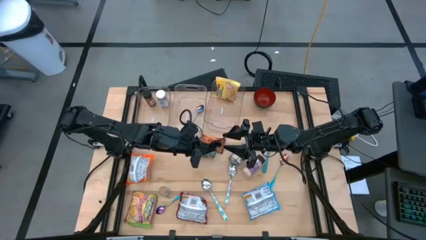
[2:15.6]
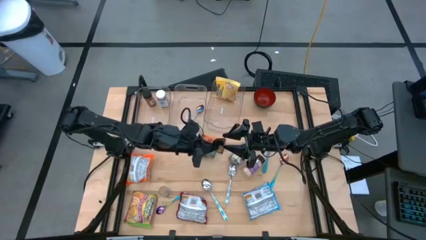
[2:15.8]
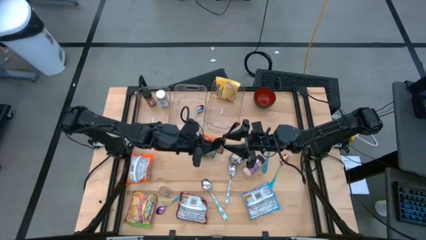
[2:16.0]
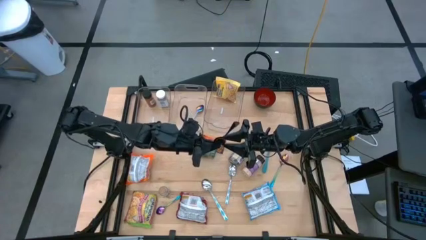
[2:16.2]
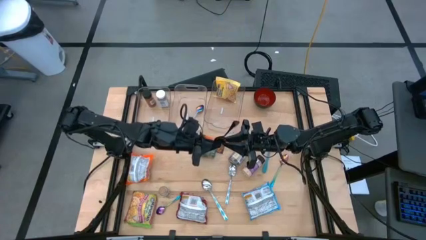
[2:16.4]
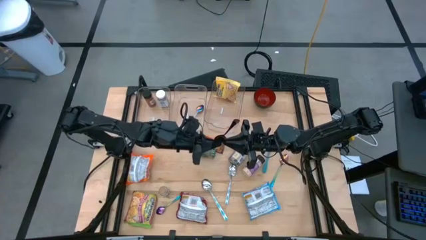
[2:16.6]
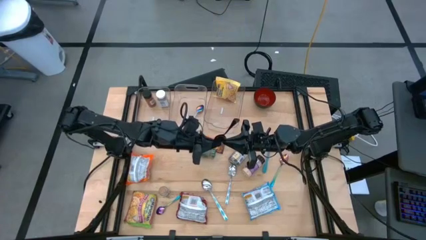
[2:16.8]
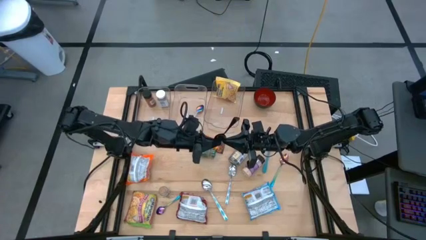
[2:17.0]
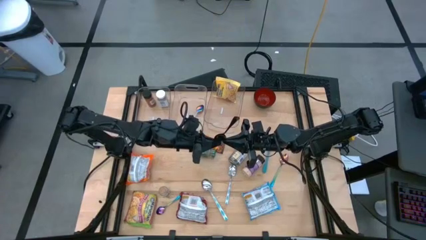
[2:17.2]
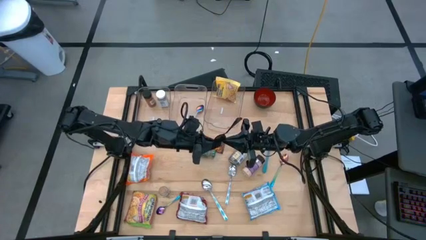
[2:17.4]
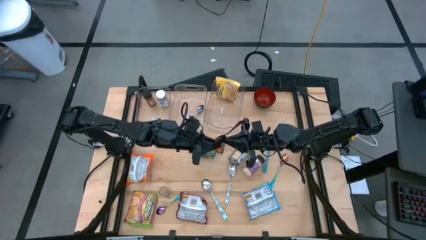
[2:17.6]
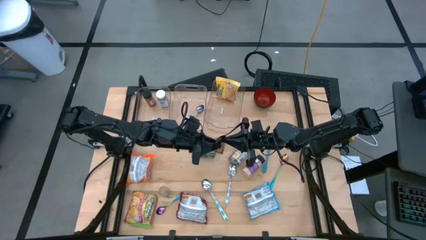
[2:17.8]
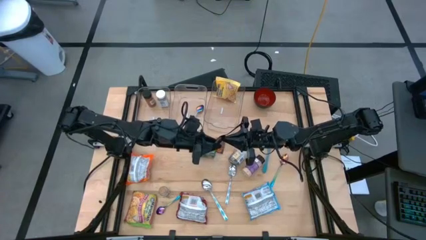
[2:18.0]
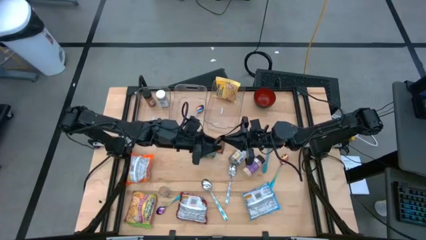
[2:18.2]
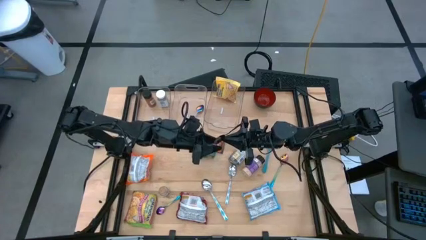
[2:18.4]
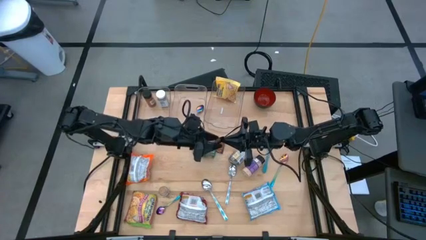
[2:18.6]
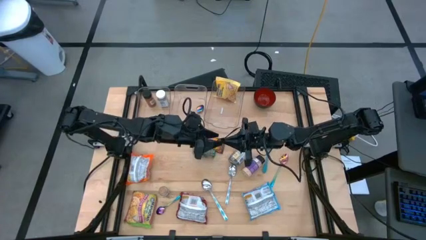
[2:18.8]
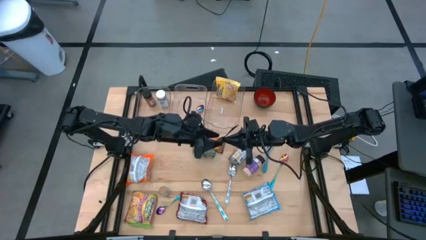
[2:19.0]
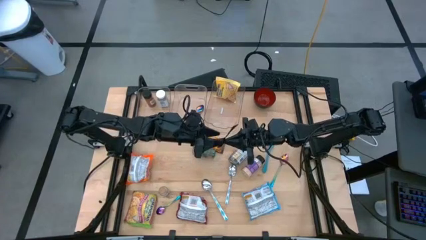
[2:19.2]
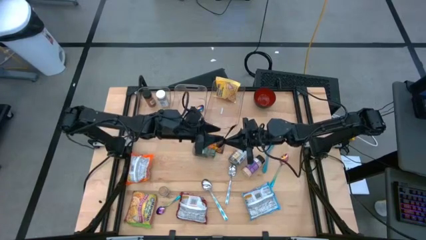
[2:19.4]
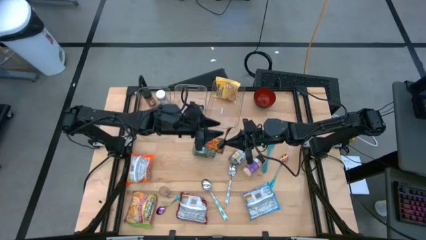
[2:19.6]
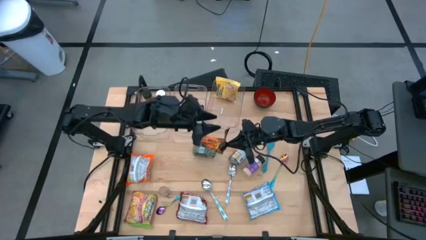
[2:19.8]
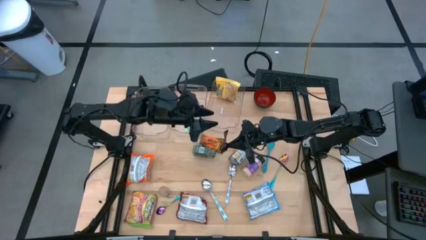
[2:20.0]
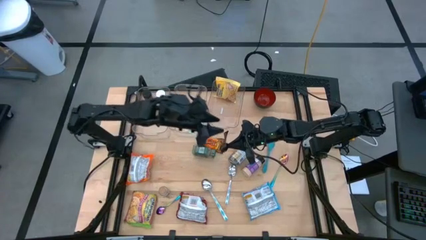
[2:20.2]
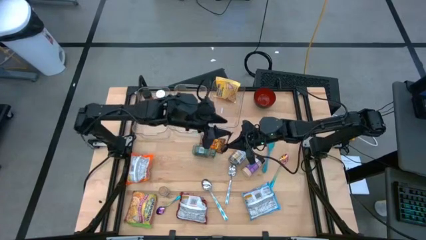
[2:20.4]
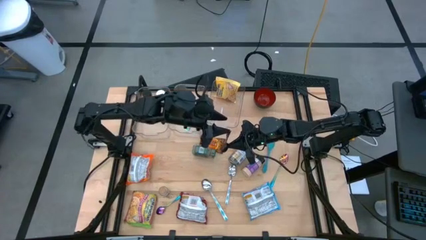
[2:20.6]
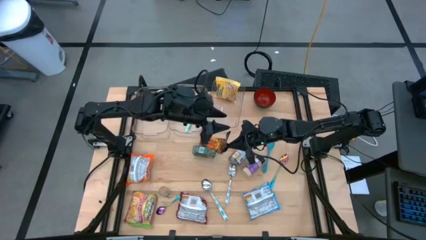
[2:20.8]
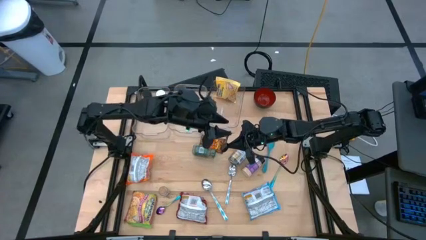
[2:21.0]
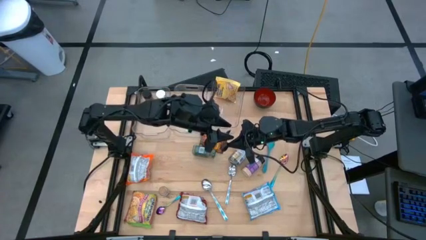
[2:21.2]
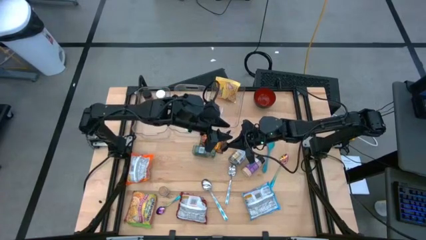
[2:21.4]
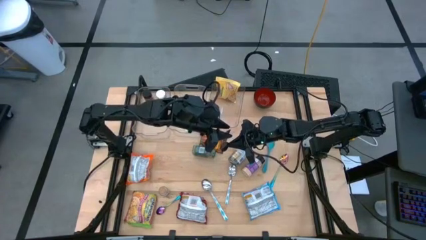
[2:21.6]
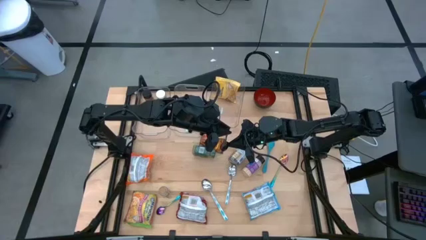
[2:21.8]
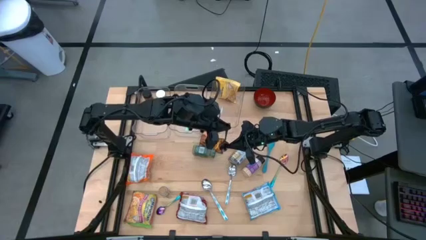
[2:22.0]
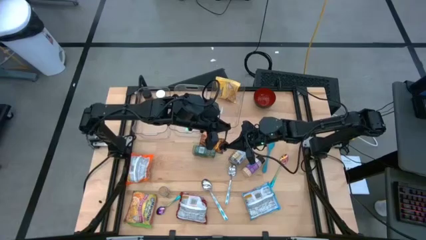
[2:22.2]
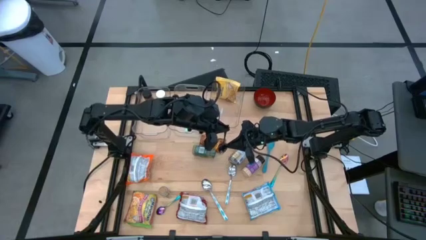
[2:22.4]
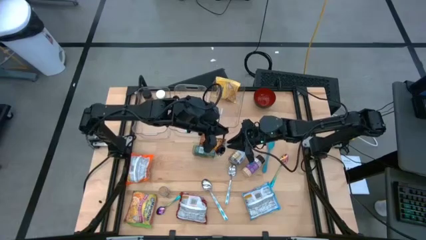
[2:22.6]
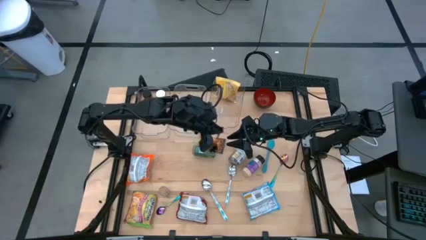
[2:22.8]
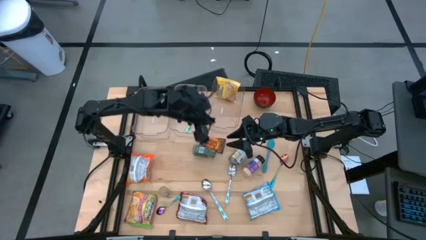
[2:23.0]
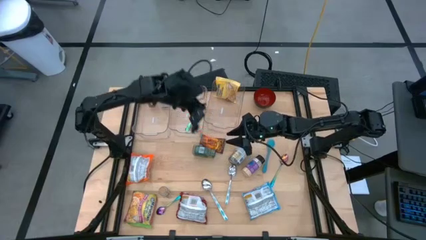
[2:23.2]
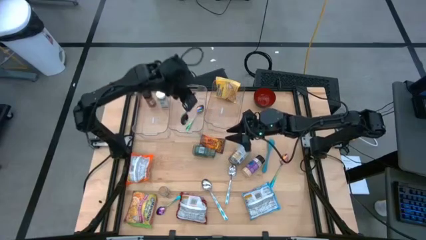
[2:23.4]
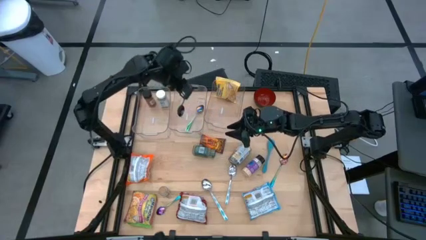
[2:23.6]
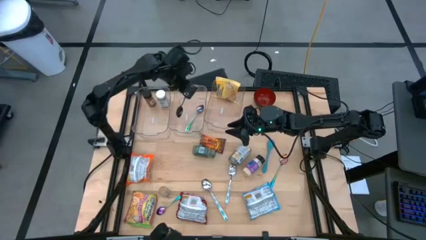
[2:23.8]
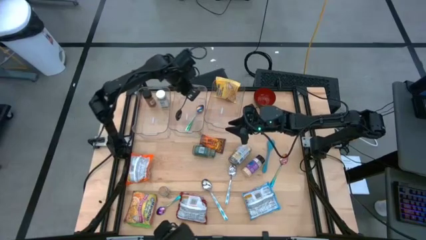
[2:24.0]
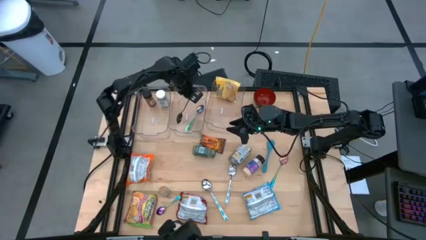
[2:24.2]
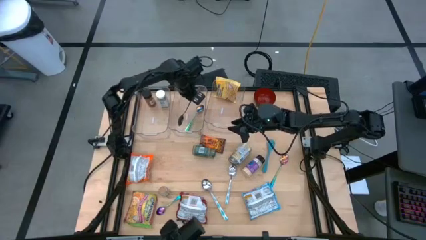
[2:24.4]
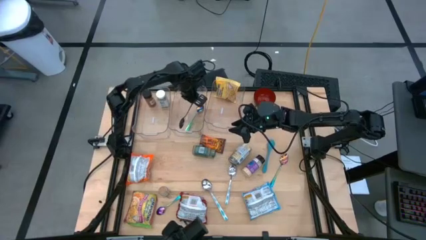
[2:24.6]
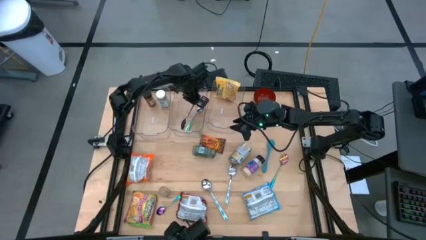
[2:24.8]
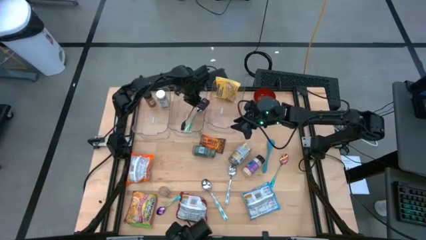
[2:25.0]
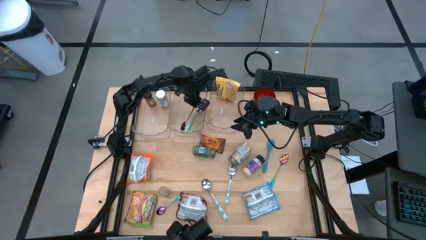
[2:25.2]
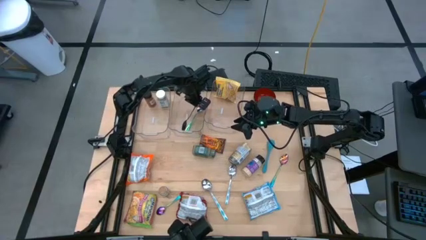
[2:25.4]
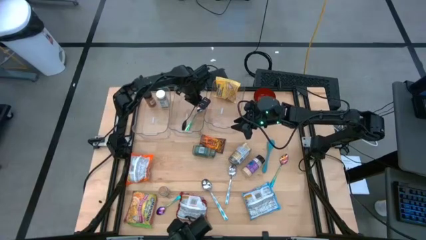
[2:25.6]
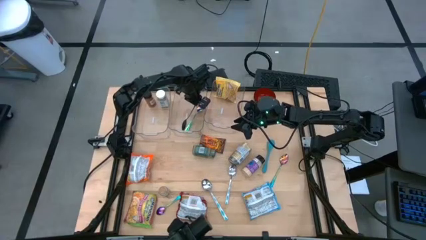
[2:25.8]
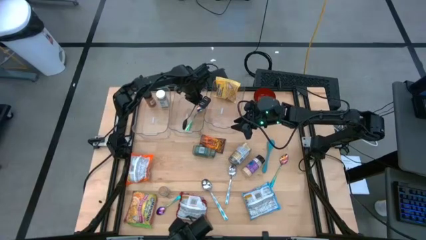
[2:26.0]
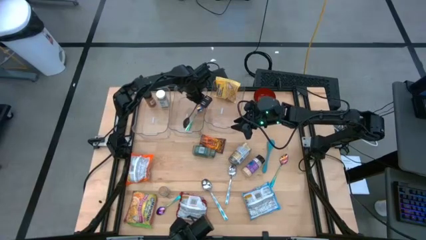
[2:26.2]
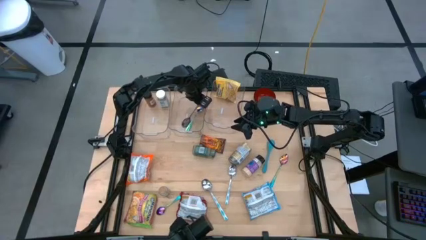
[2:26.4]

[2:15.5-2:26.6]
Task: Pick & Place Food Item
Put the black spoon into the middle transparent bin

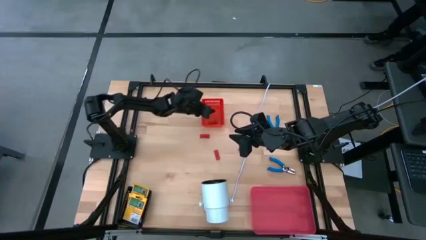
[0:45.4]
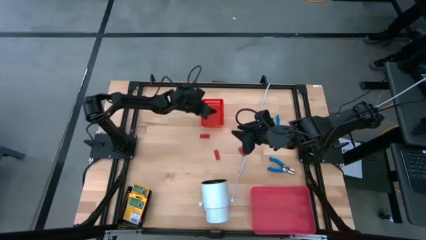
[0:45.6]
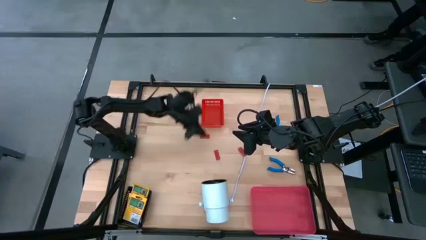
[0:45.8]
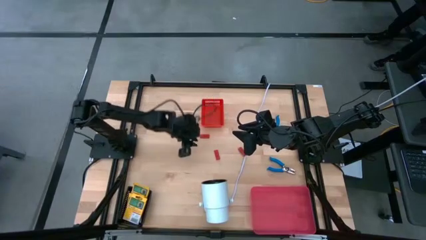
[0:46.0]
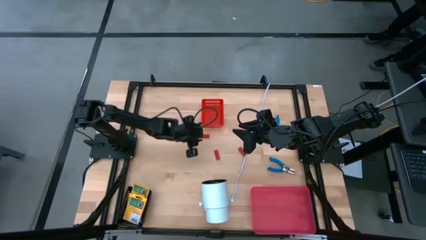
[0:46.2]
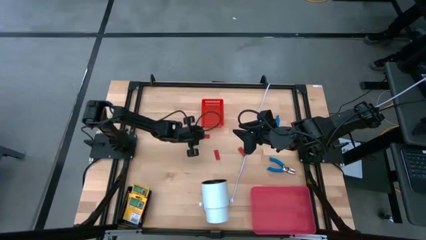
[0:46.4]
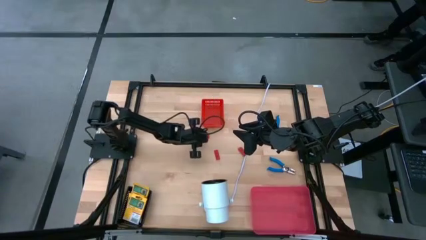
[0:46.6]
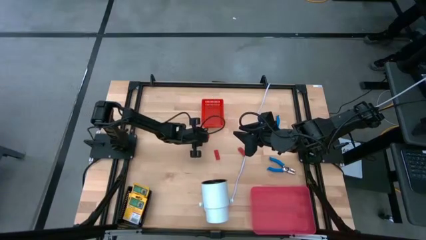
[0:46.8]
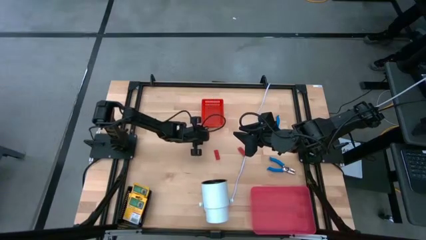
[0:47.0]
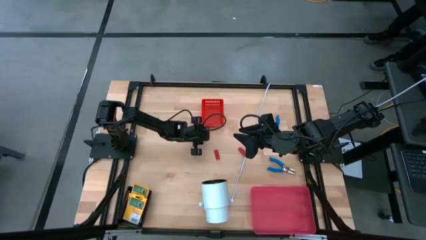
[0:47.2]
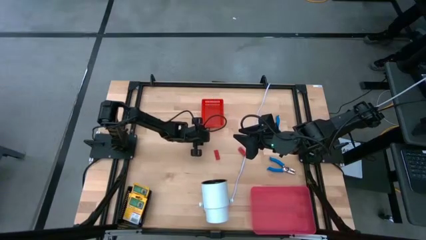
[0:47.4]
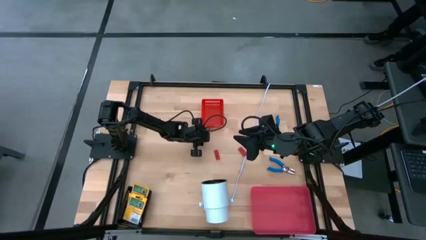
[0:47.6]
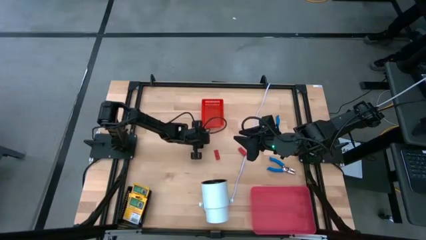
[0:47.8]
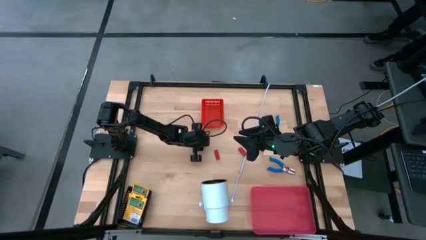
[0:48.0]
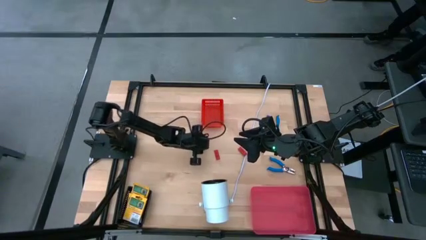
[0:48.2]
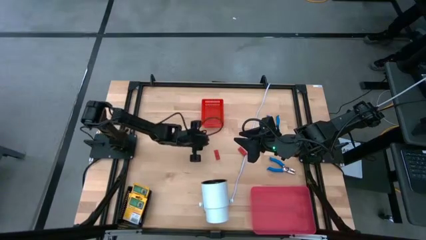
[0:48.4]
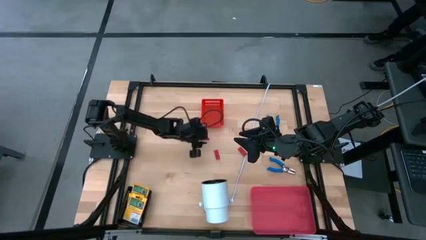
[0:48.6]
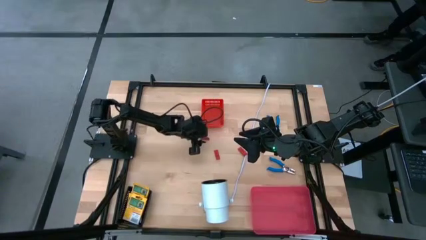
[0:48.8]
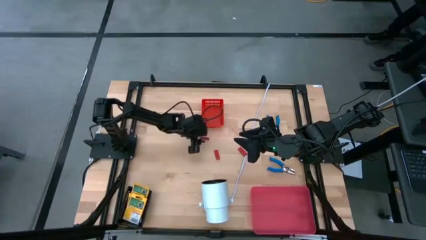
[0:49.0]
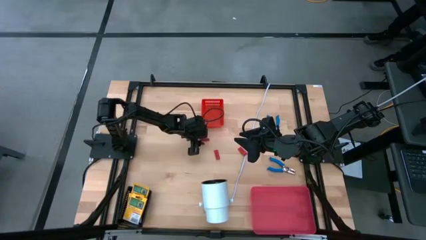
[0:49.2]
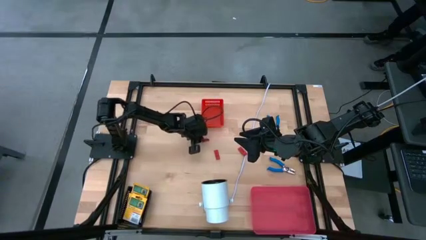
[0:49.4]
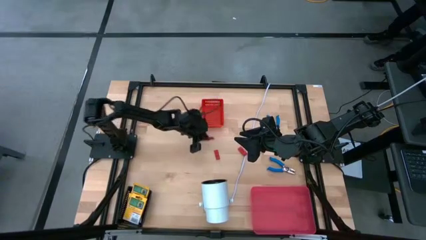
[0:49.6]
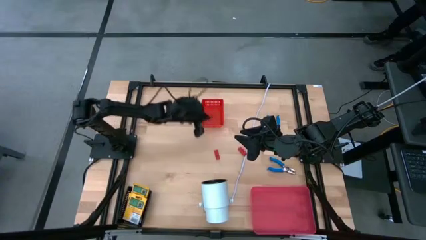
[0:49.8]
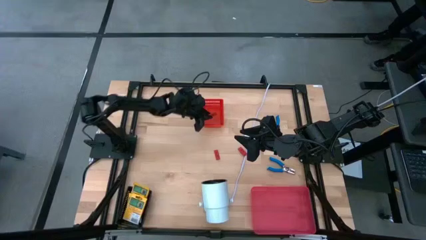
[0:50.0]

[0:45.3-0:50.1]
Task: Pick & Place School Supplies
Put the red eraser into the red bin
